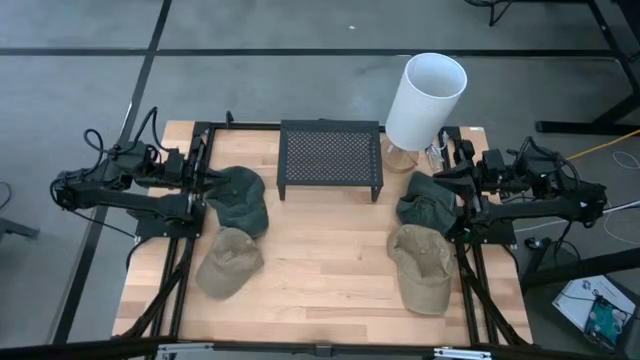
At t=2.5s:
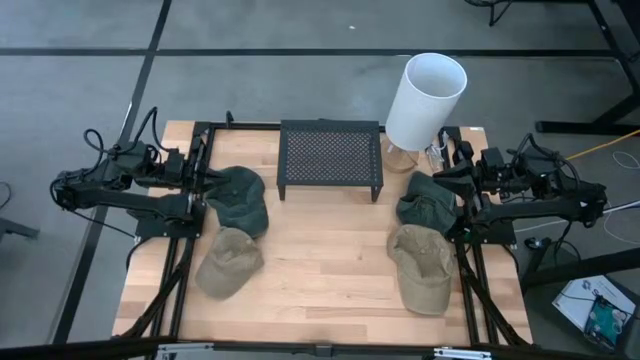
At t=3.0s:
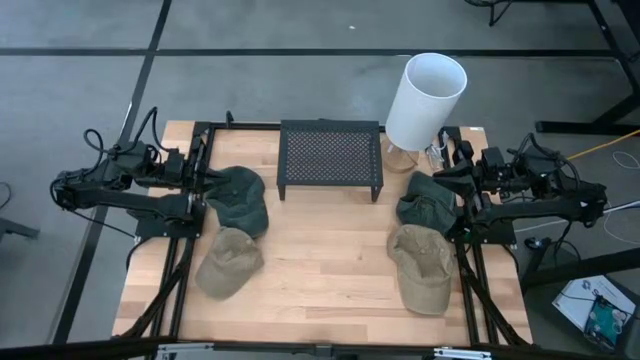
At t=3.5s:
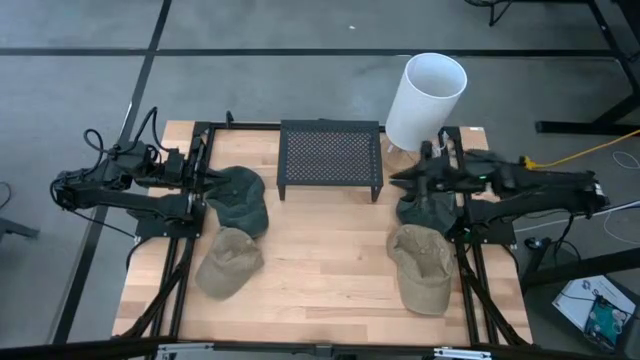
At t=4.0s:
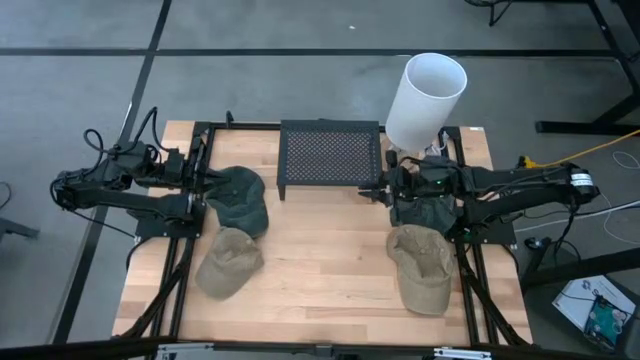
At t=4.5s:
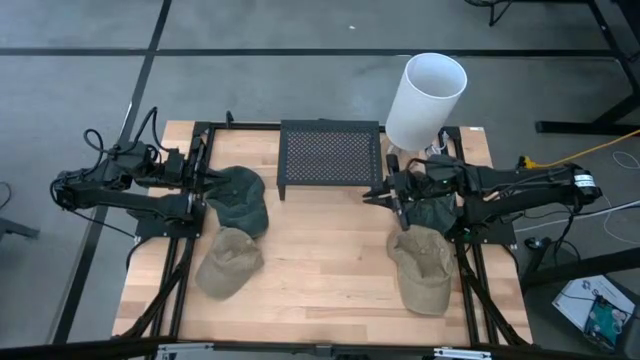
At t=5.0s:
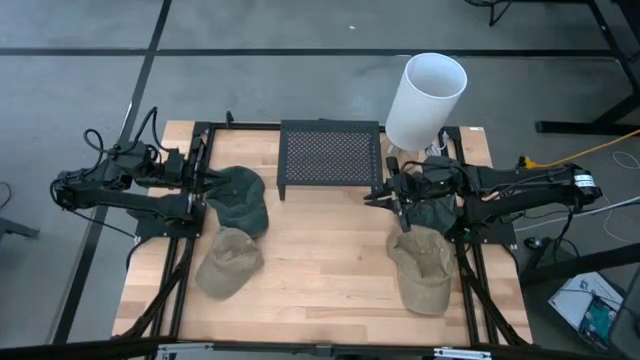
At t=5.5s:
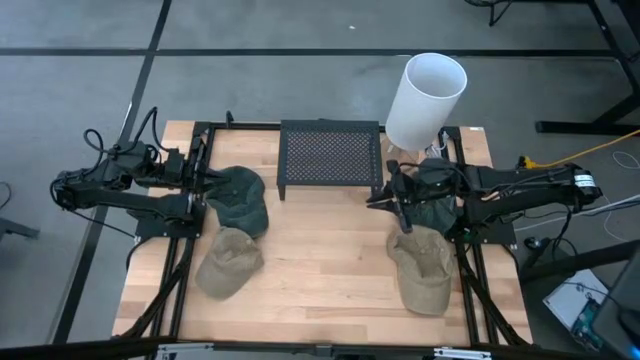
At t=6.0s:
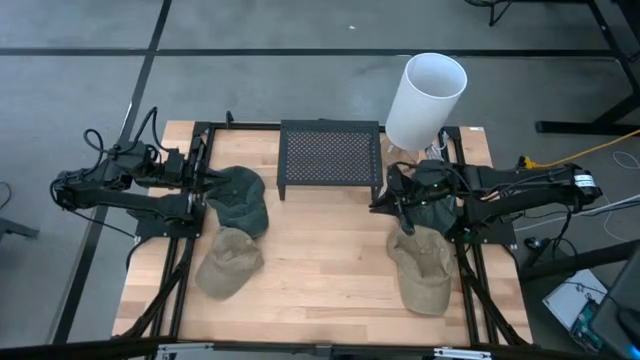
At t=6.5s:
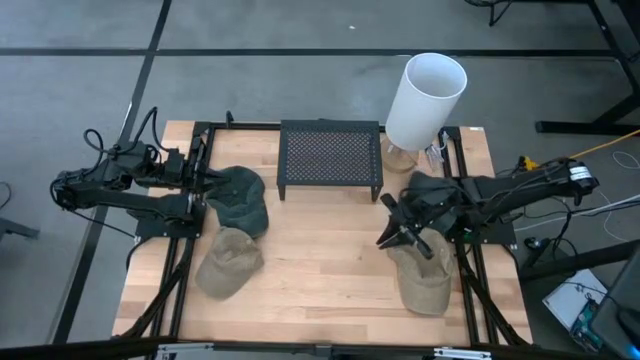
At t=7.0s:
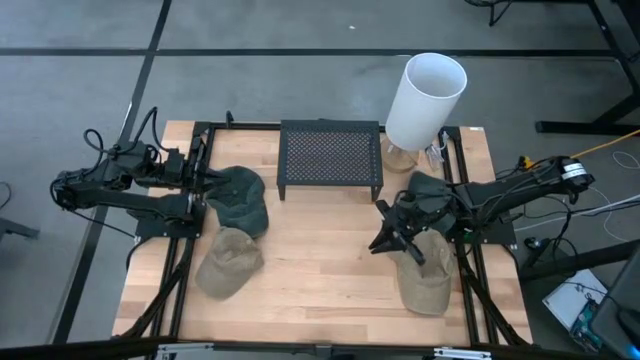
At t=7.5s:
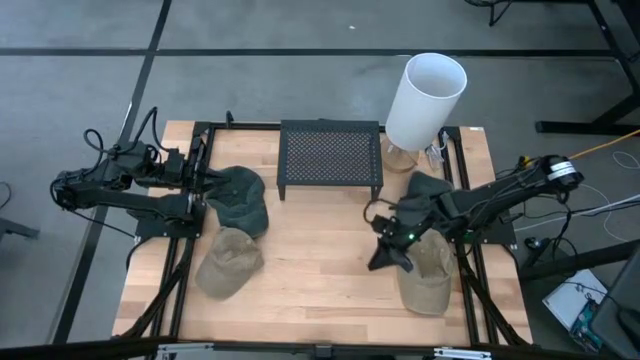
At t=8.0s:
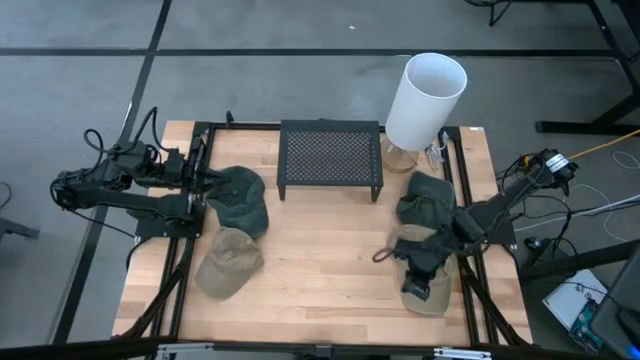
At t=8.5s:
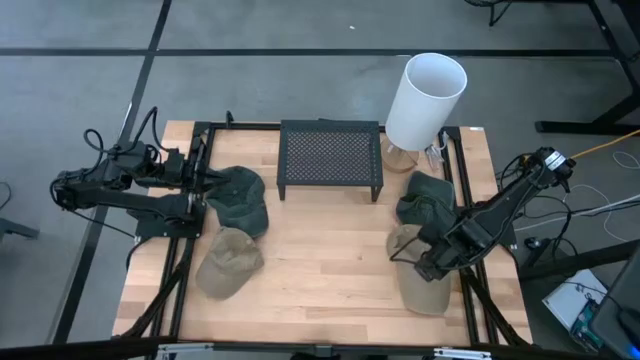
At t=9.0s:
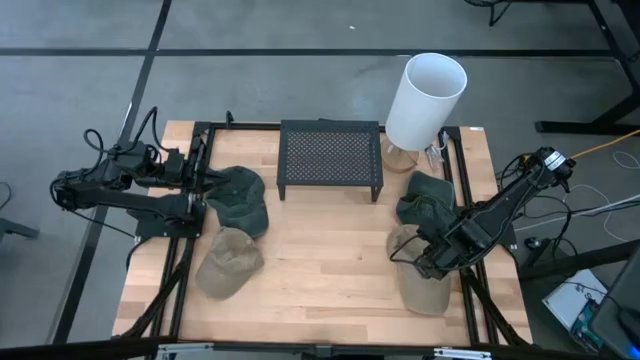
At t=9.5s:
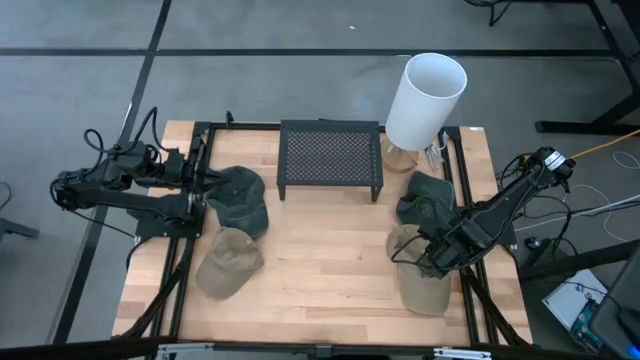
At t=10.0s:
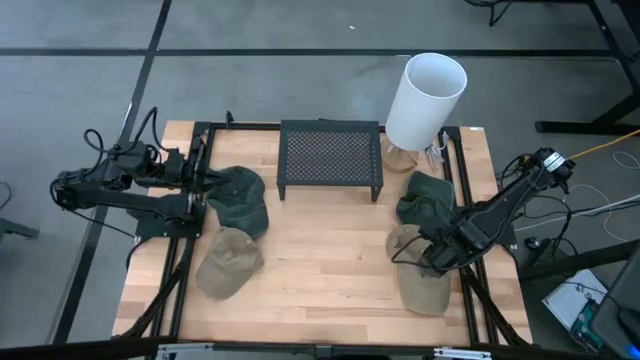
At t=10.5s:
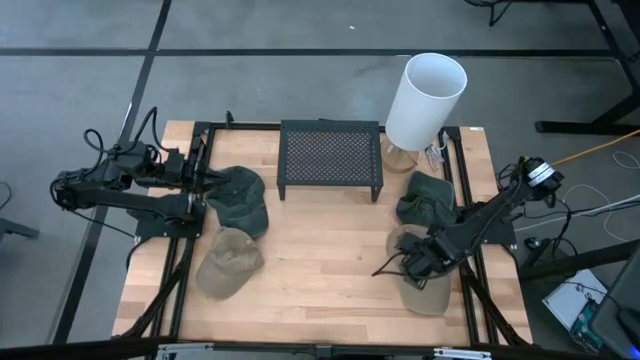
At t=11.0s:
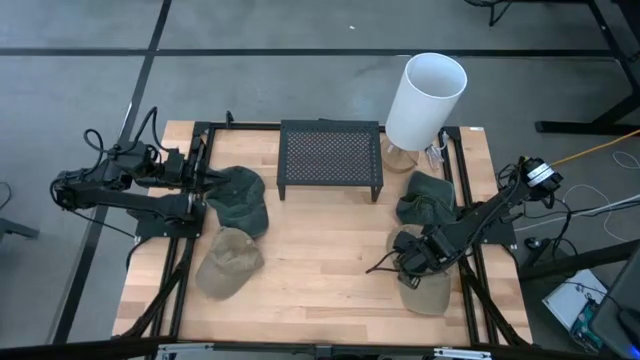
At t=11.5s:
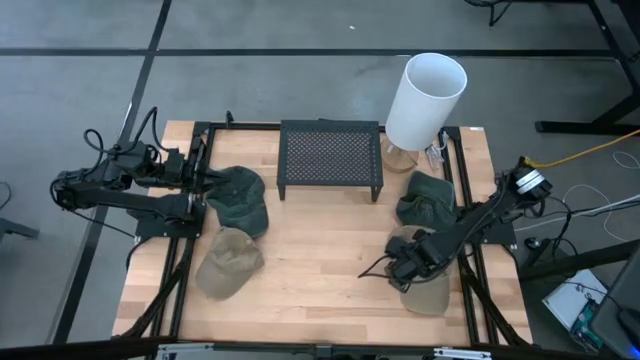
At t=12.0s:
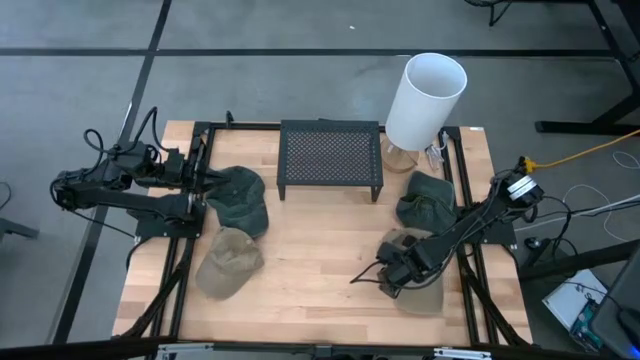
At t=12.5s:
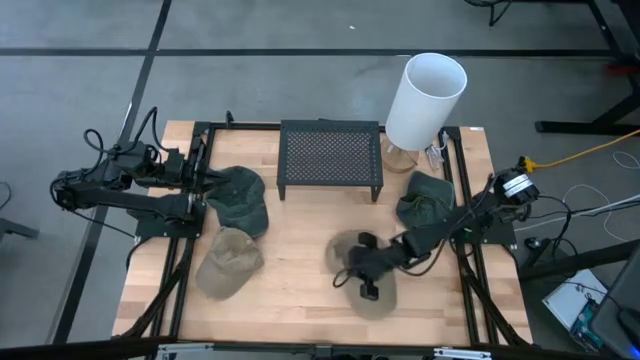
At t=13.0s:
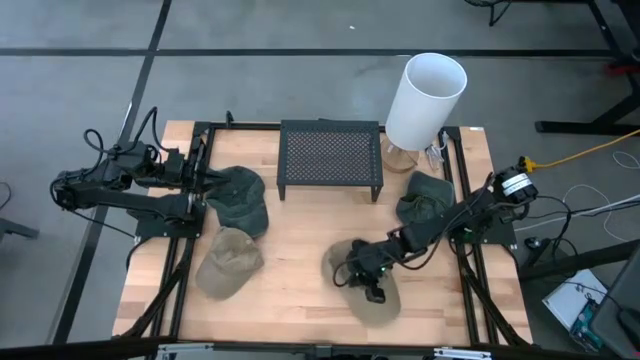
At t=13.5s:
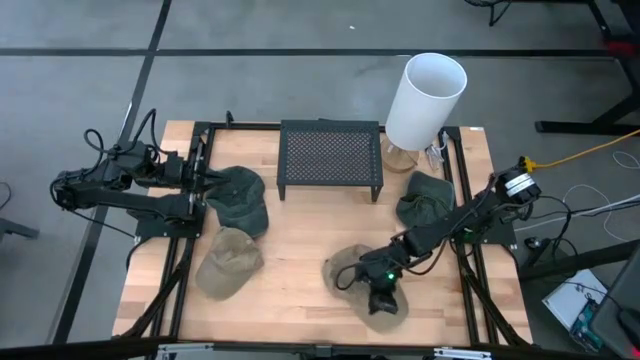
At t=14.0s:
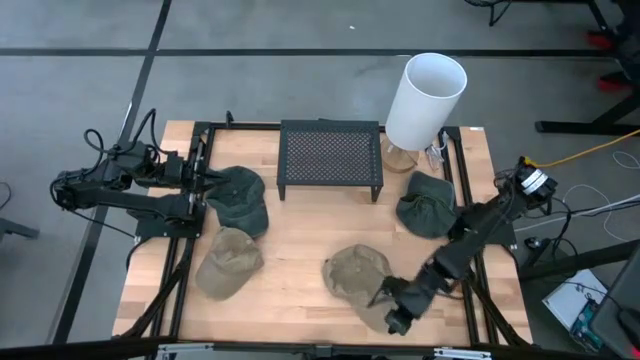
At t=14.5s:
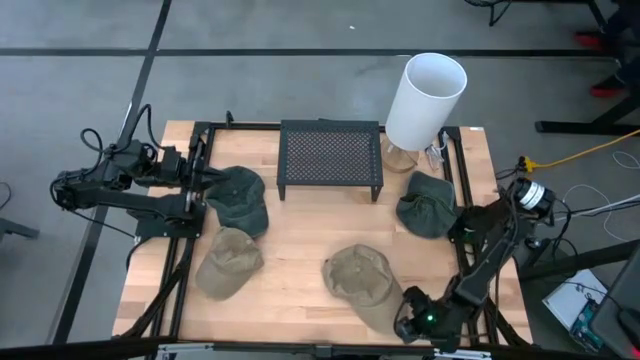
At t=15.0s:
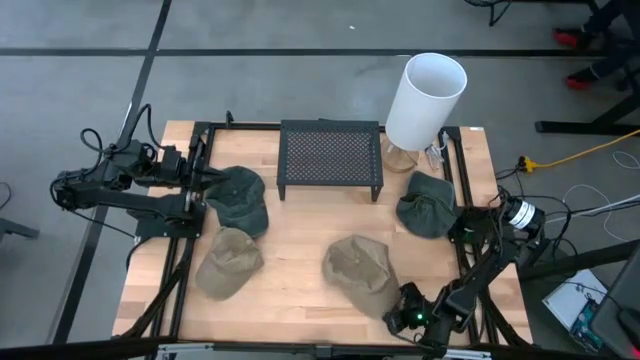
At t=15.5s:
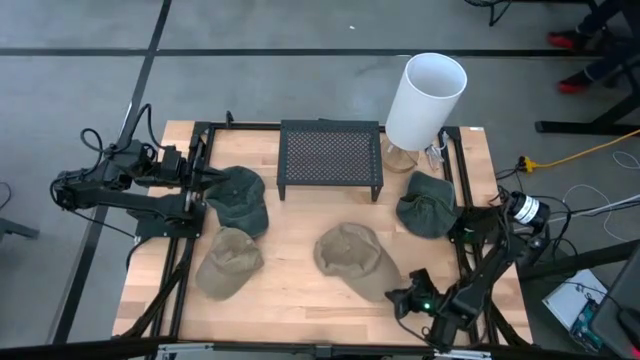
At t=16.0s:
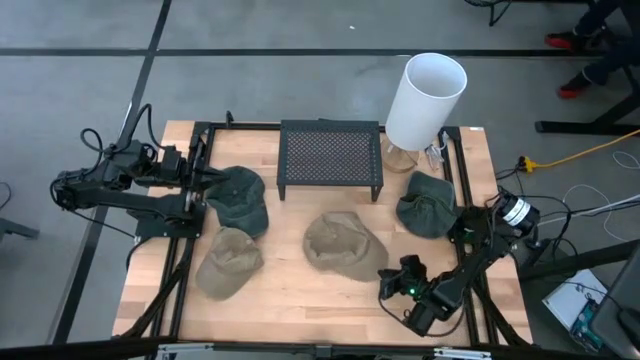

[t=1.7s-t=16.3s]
Task: Pick & Place hat
Put the right brown cap on the shelf

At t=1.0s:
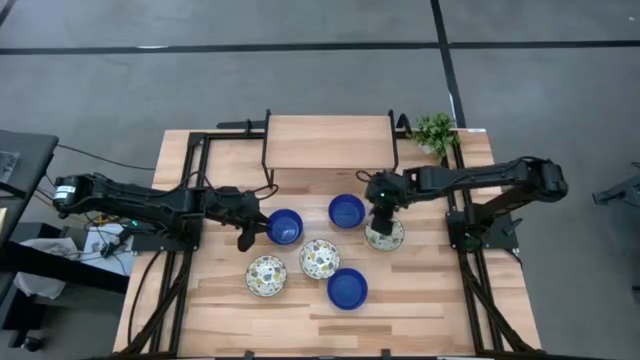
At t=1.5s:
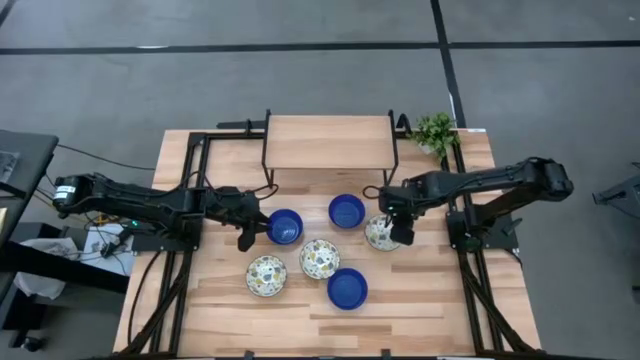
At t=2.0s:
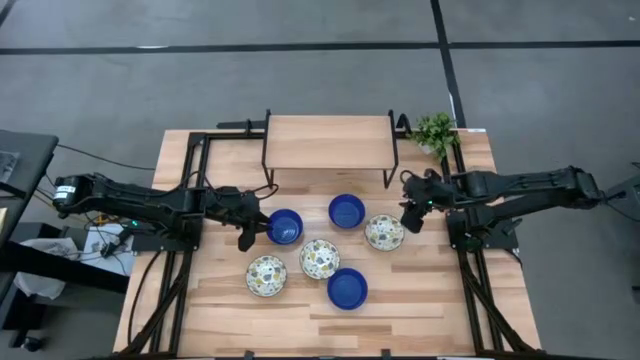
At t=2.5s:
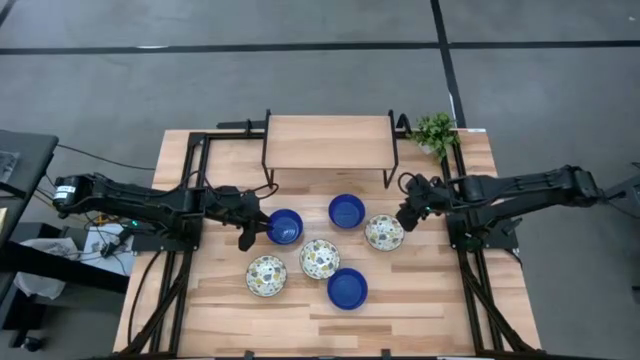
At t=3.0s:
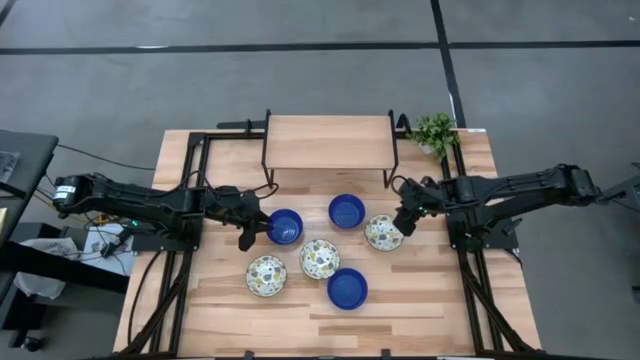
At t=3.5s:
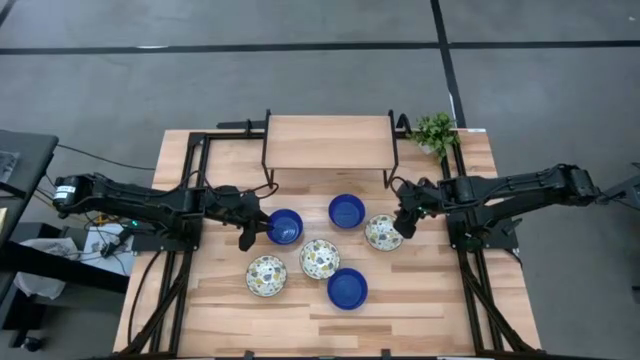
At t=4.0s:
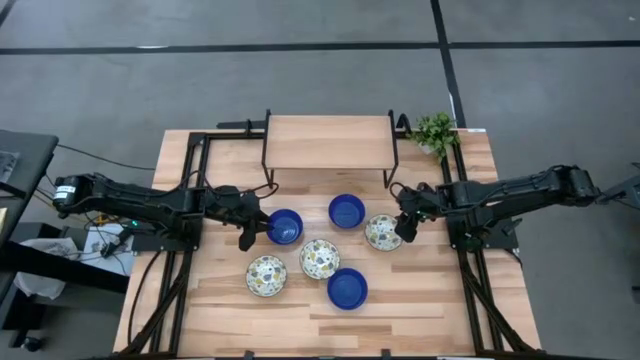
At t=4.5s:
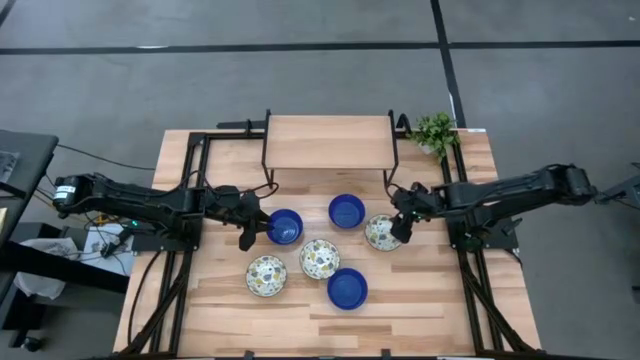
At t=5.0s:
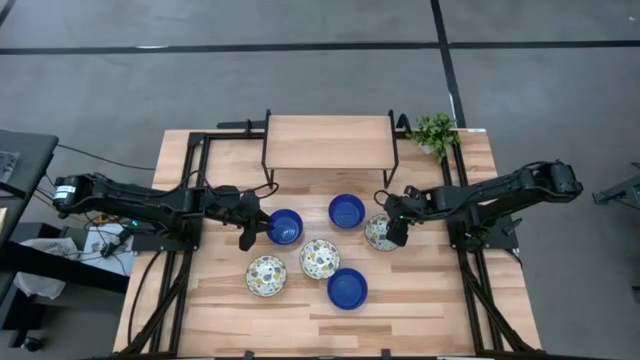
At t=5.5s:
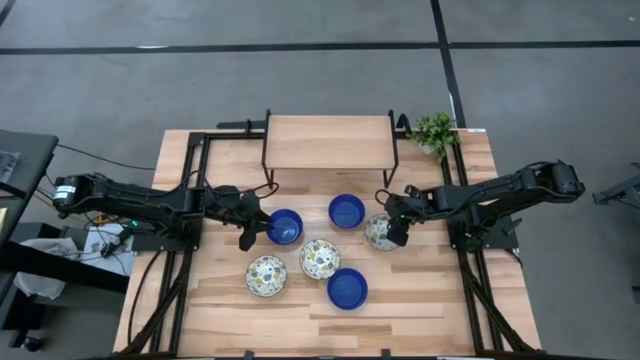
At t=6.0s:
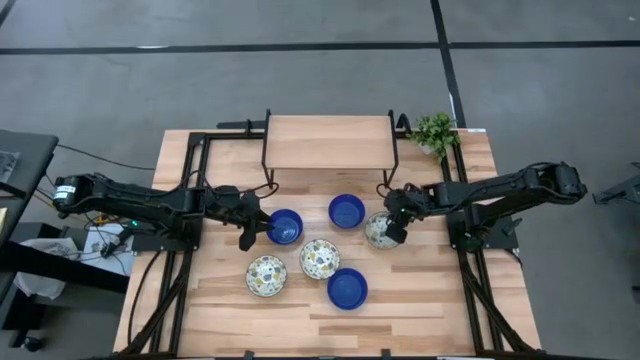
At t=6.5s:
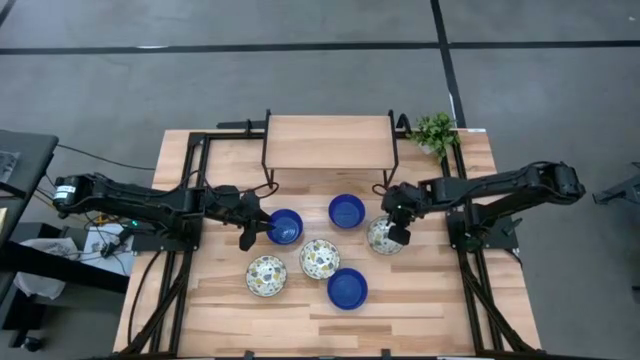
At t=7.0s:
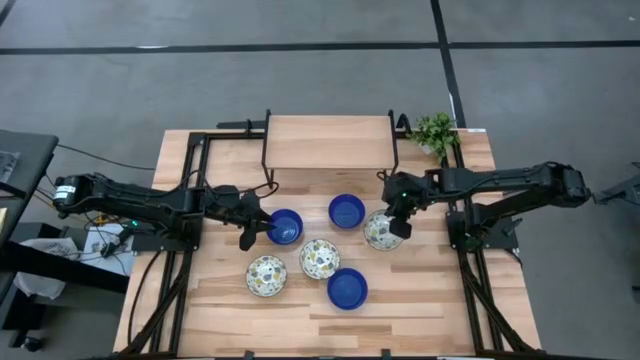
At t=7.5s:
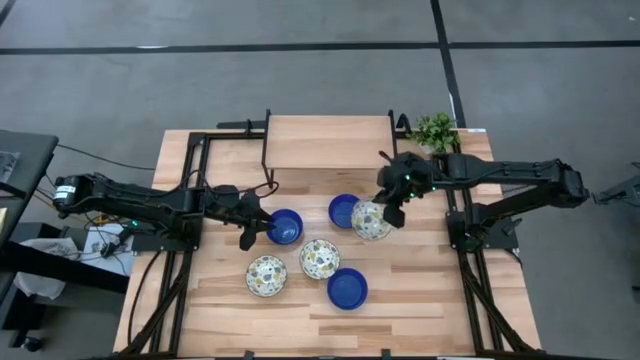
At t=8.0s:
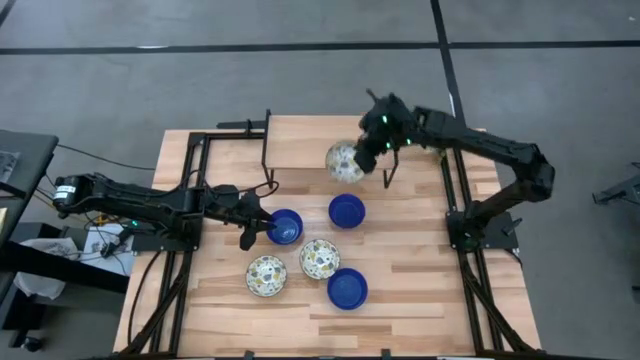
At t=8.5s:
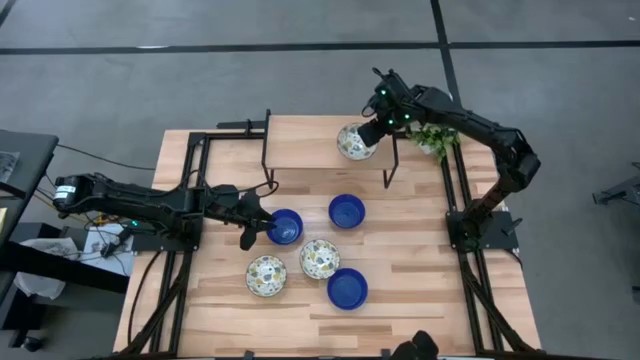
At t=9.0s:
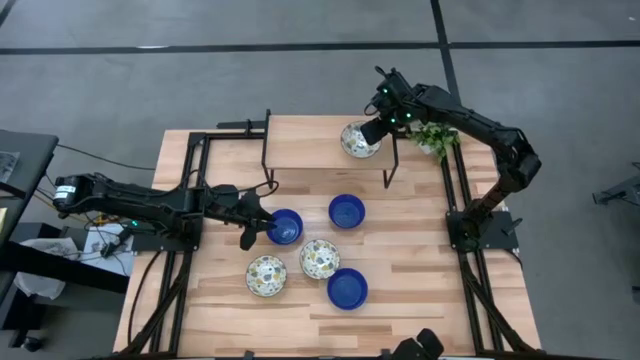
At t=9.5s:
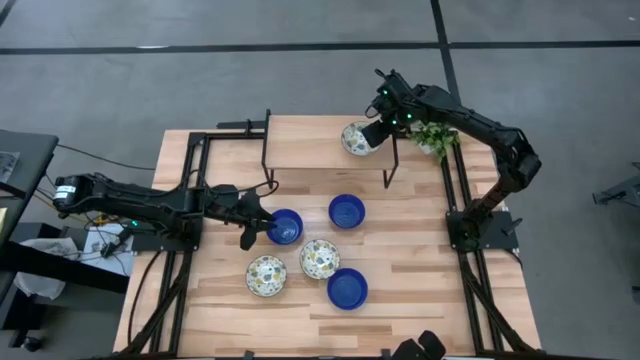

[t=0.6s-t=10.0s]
Task: Pick & Place Mini bowls
Put the top white patterned bowl on the shelf
